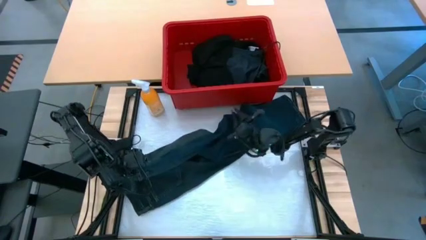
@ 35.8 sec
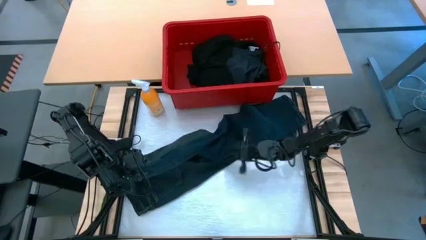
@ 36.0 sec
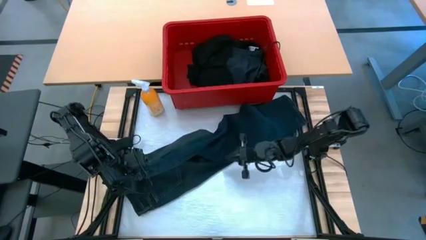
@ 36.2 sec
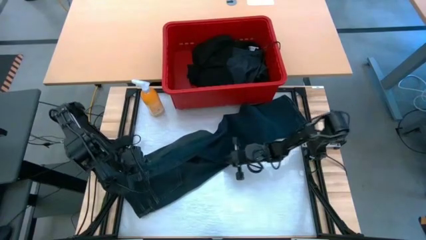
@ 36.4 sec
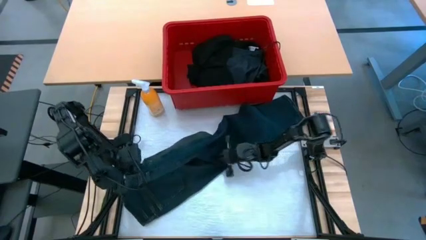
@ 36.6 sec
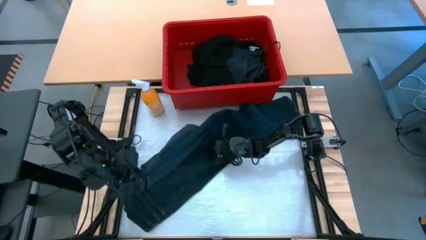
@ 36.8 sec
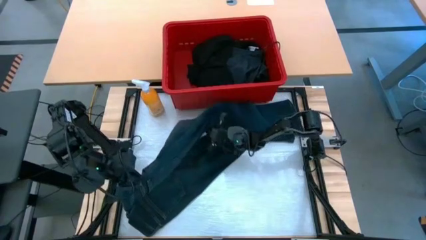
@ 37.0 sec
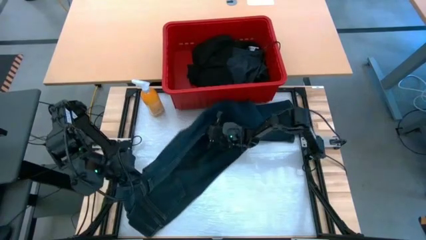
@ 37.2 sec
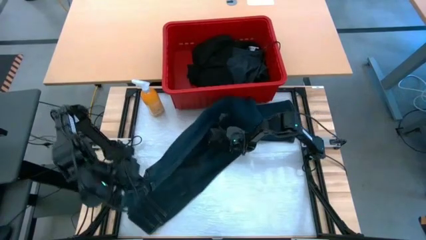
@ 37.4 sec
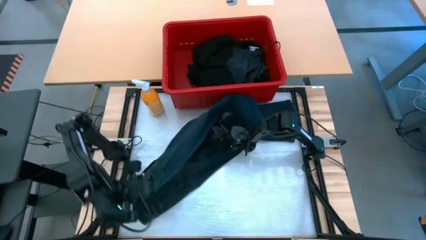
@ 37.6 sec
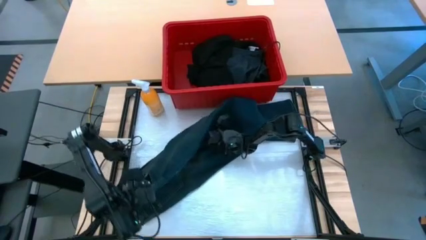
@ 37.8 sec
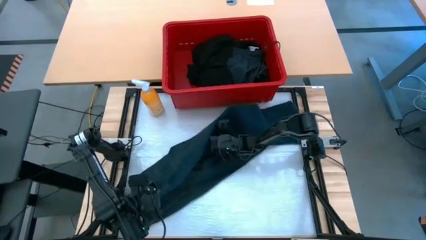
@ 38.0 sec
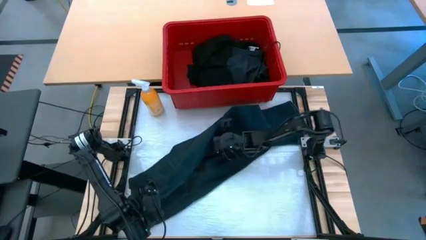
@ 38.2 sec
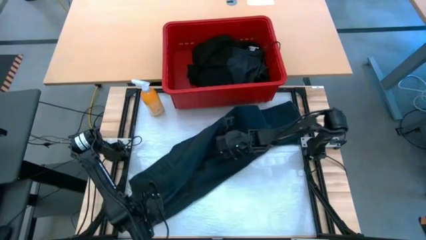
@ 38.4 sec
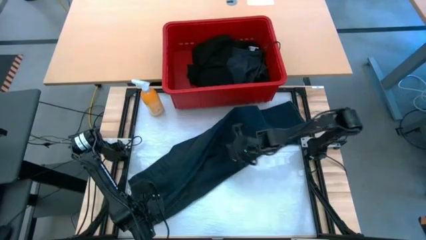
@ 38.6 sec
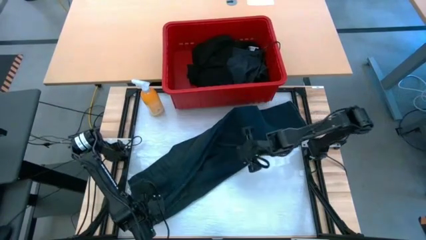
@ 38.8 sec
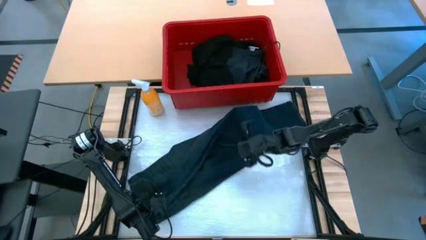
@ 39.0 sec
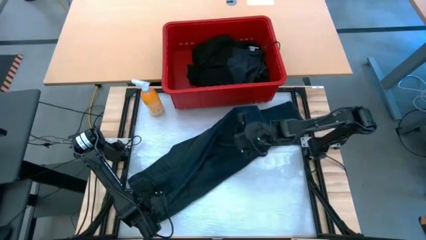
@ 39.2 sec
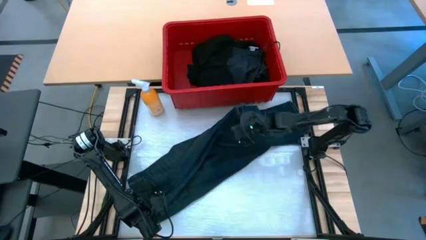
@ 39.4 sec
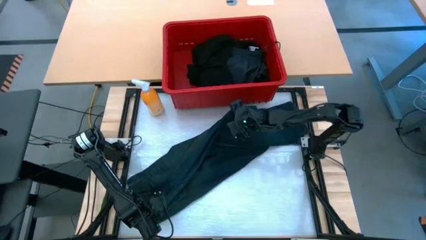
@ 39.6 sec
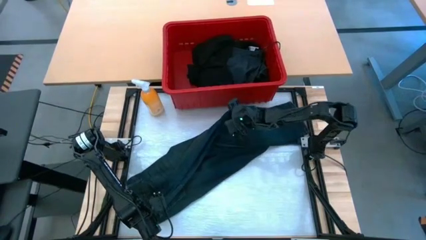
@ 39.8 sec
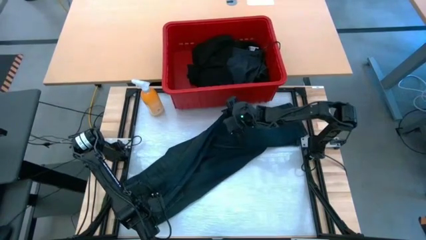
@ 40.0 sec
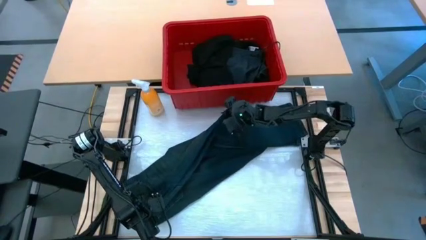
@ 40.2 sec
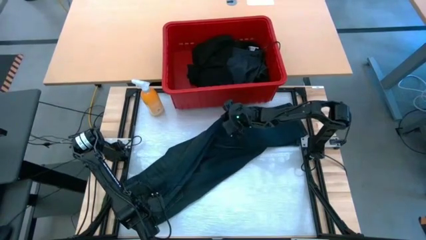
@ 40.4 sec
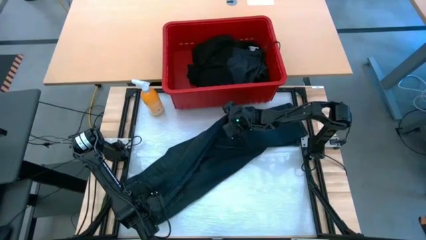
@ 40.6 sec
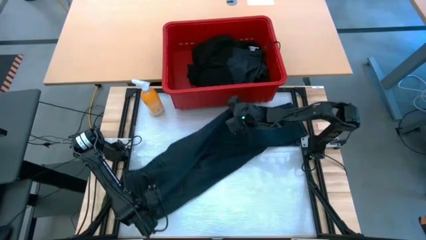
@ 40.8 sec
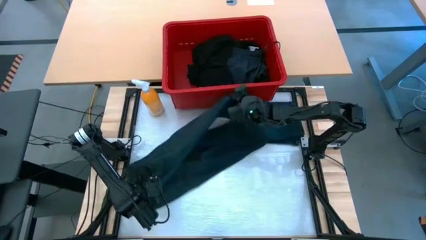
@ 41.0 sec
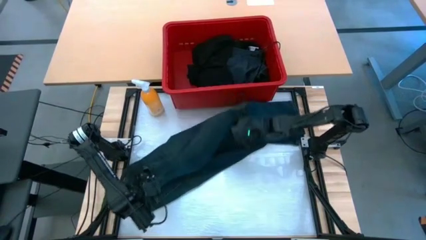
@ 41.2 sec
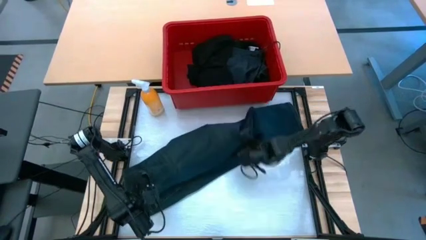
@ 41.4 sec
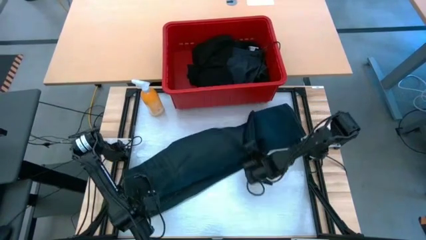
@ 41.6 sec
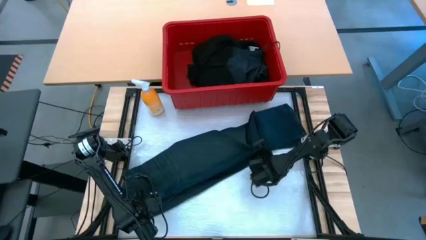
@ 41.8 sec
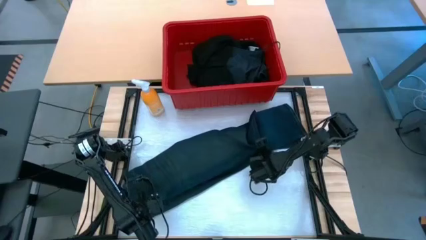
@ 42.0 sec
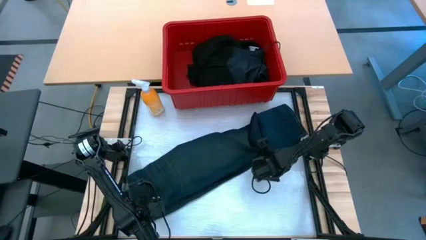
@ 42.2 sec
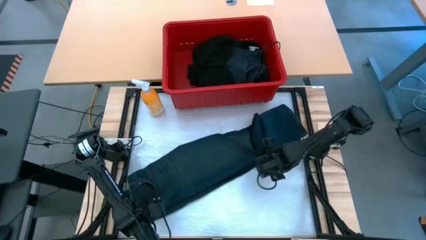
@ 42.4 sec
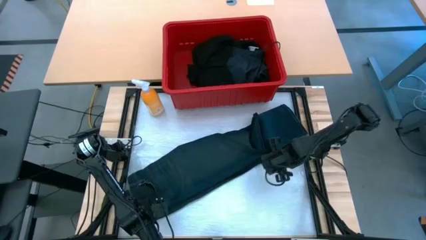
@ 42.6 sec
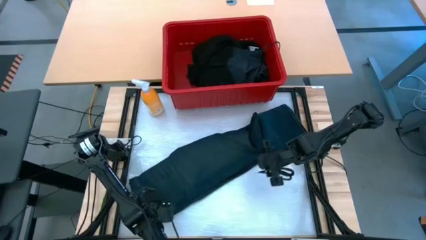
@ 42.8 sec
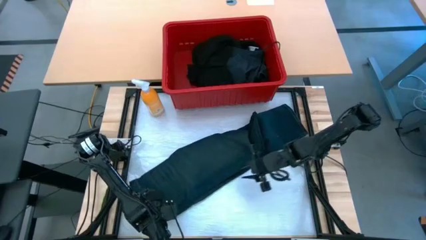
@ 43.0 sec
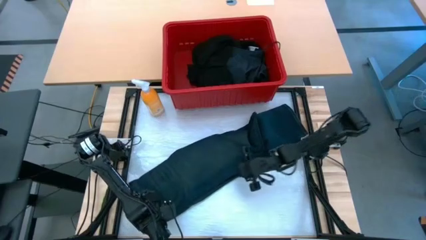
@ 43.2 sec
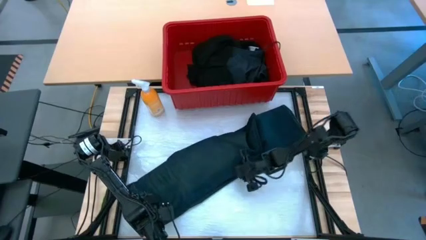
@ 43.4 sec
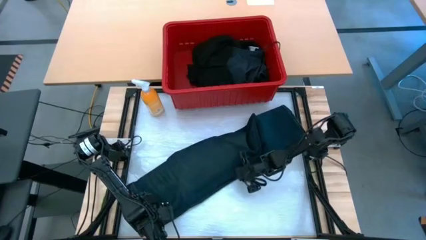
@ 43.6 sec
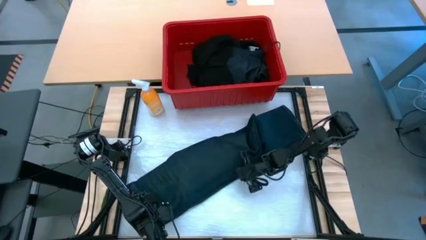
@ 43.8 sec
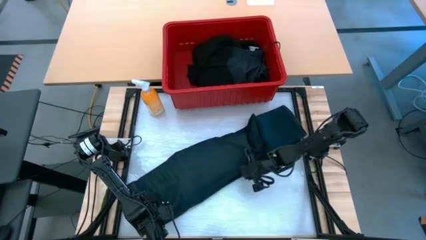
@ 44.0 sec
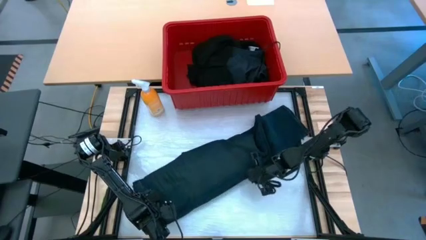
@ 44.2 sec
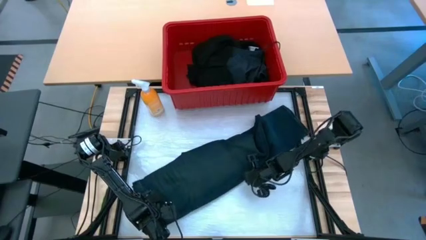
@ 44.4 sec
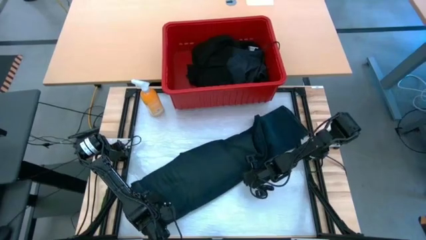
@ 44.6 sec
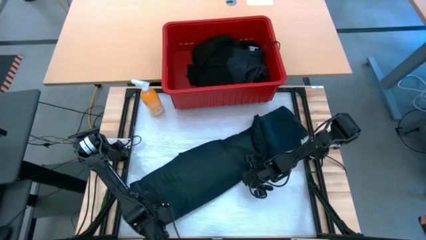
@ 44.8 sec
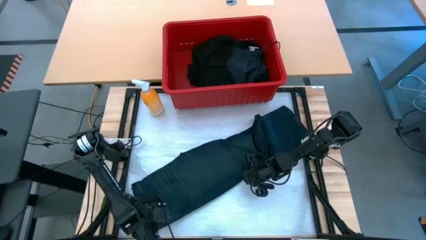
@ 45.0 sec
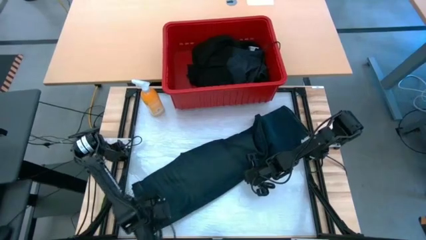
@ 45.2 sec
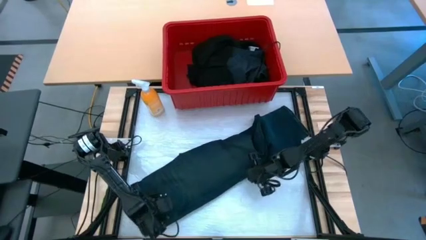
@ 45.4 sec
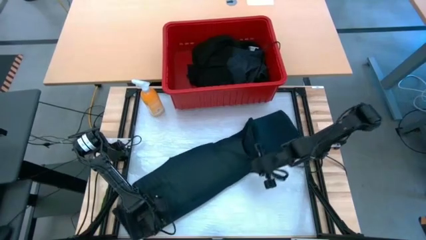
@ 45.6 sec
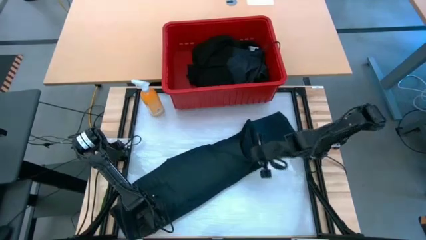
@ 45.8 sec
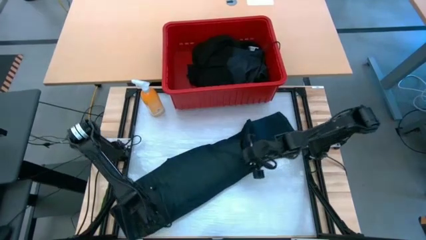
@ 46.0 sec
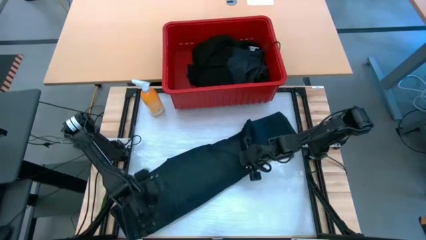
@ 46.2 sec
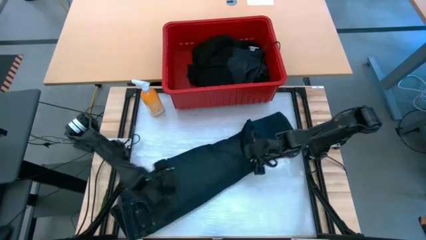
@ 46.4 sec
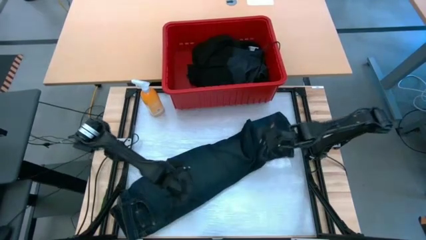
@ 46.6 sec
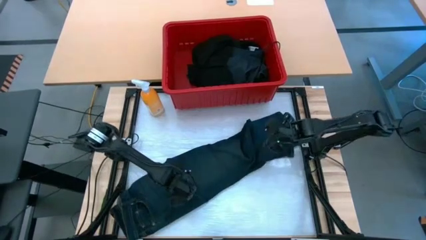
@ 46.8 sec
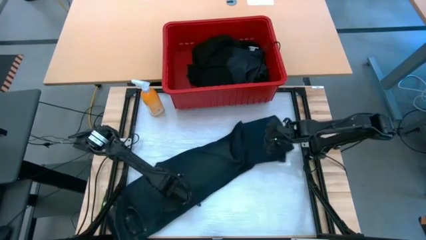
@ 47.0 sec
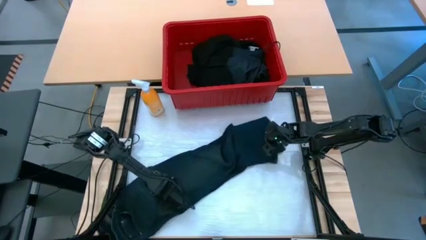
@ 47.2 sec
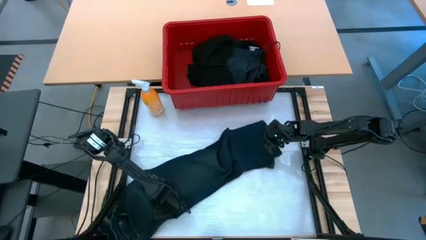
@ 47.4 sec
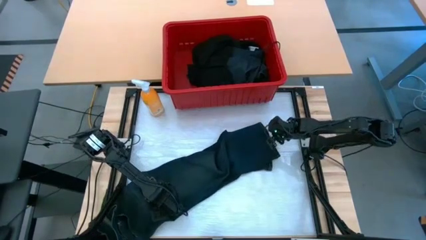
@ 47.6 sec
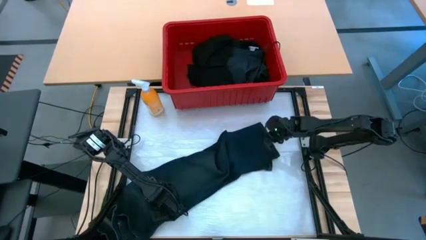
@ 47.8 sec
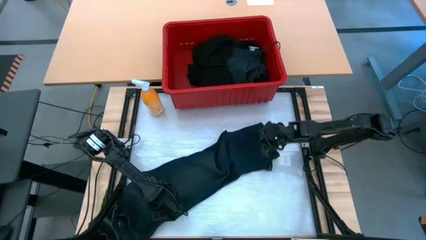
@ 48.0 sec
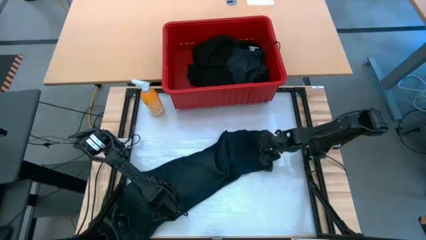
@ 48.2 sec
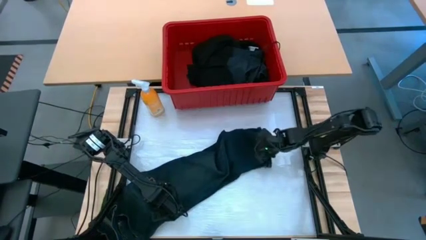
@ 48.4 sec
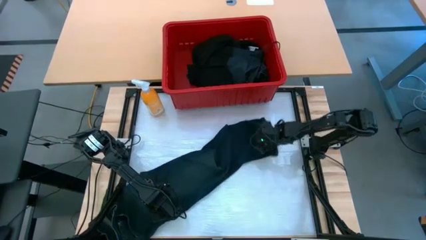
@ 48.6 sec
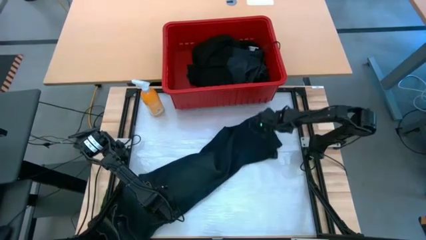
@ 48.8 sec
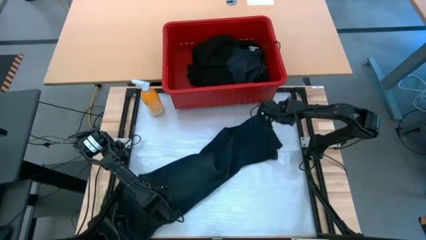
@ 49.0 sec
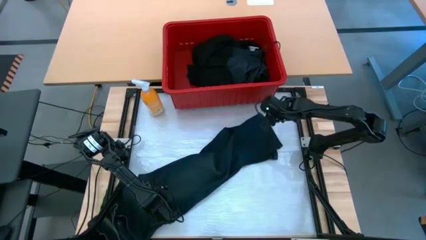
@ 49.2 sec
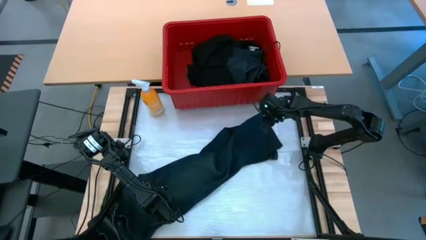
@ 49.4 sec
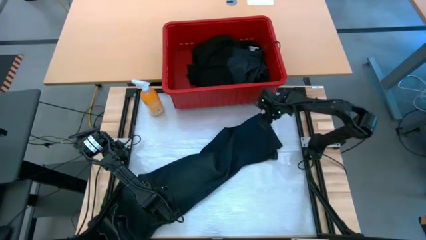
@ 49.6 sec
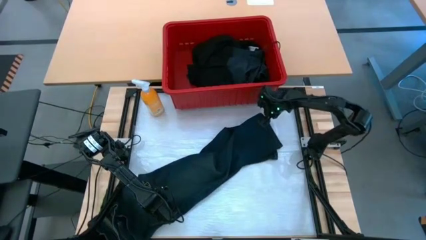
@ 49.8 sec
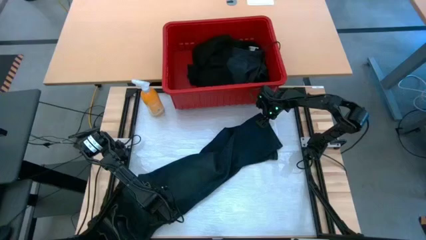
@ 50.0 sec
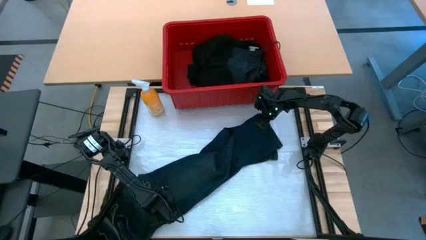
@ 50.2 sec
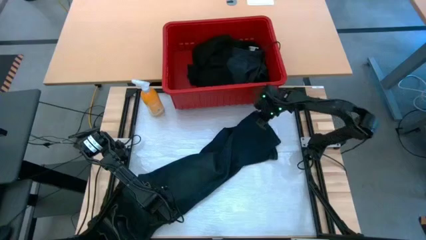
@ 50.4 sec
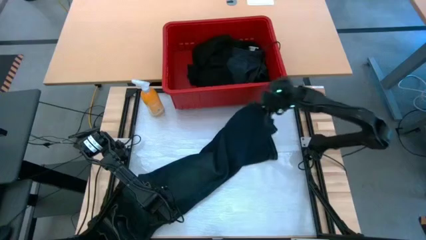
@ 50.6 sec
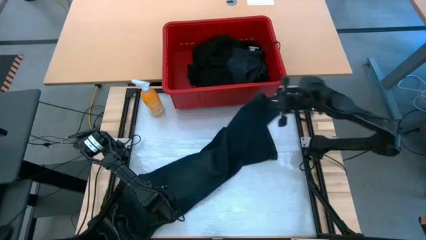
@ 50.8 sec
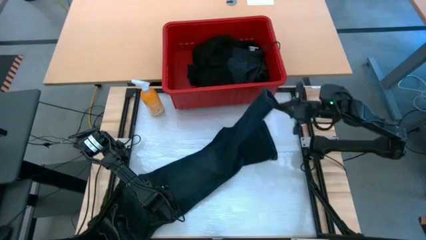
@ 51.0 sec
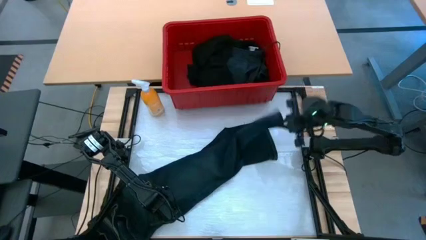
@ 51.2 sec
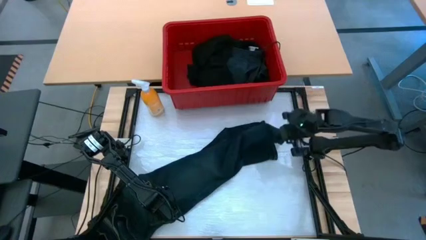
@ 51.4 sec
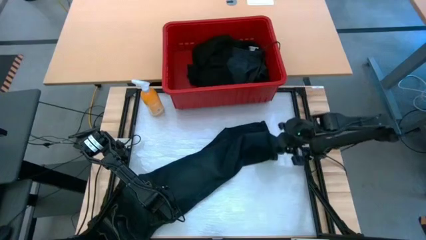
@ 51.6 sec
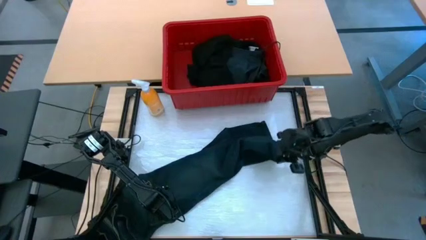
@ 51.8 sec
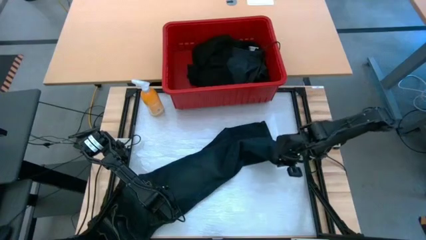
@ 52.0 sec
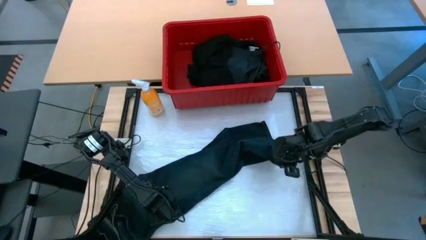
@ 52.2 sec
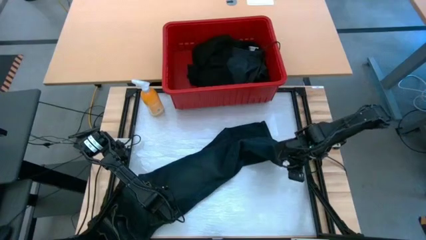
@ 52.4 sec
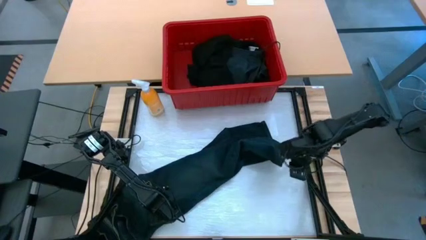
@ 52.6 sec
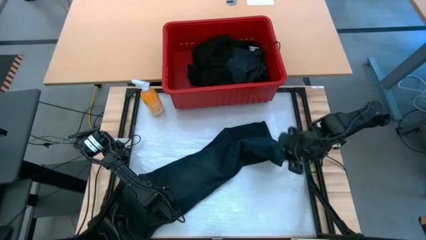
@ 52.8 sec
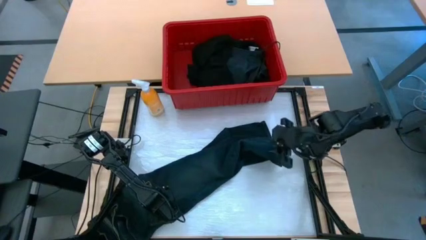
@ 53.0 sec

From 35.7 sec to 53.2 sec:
Task: Fold Laundry from Bin
Fold the dark blue pants
